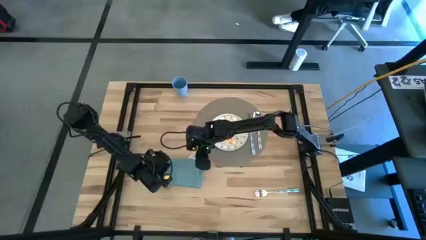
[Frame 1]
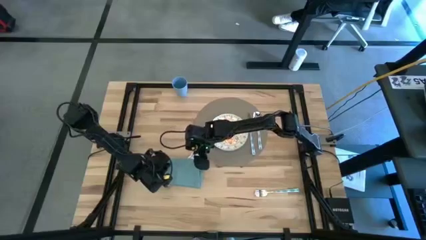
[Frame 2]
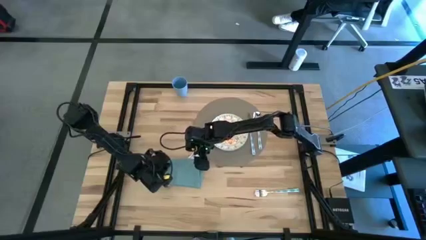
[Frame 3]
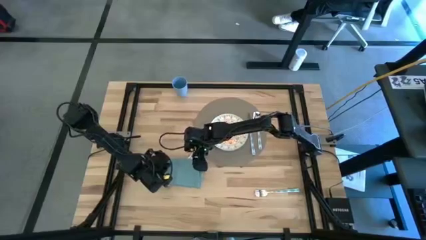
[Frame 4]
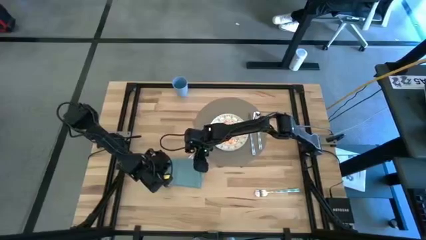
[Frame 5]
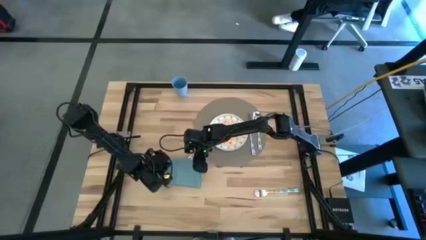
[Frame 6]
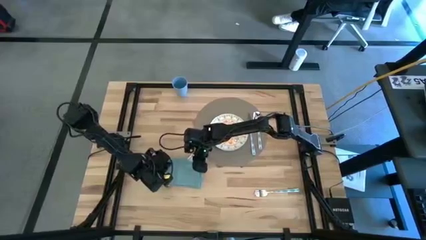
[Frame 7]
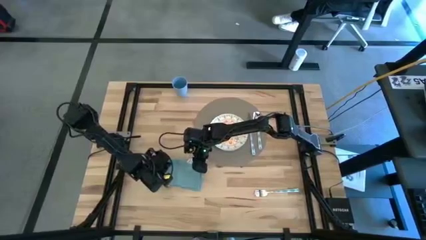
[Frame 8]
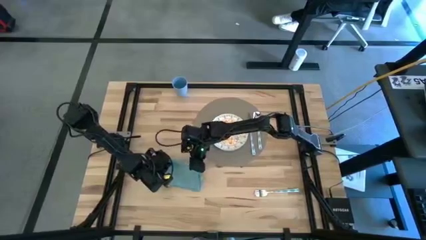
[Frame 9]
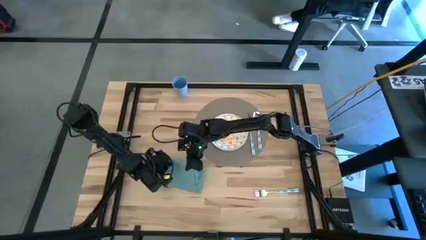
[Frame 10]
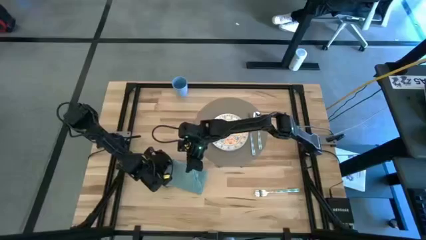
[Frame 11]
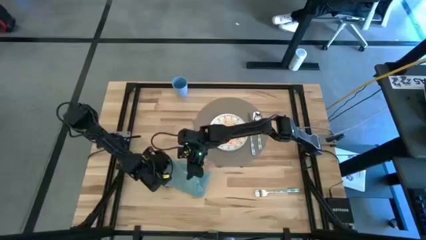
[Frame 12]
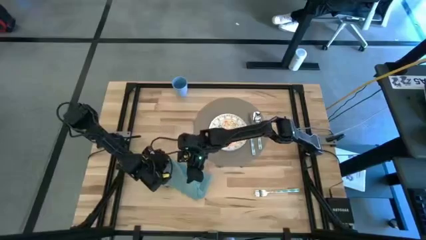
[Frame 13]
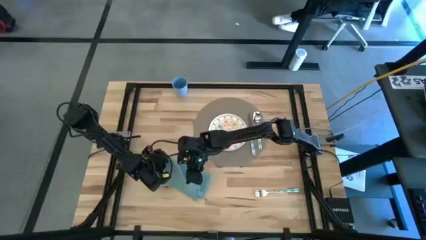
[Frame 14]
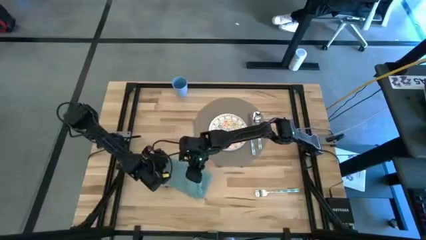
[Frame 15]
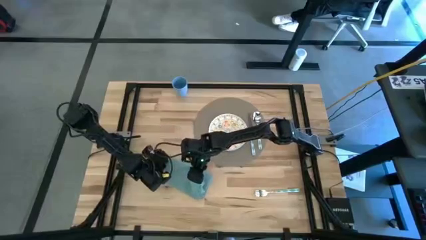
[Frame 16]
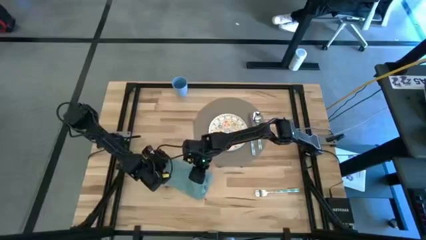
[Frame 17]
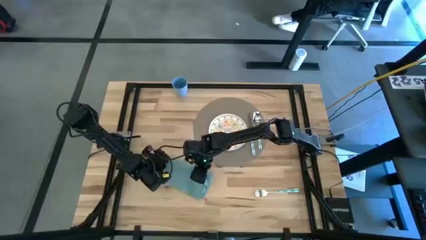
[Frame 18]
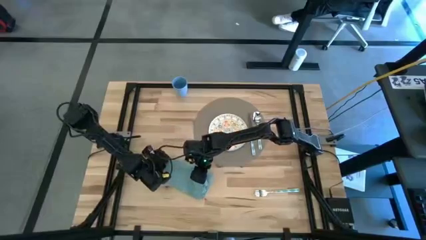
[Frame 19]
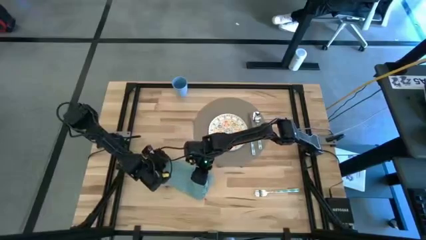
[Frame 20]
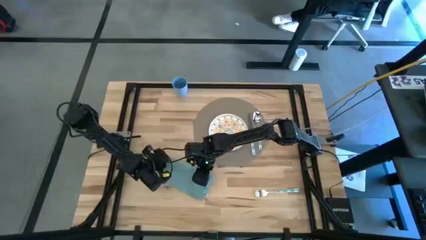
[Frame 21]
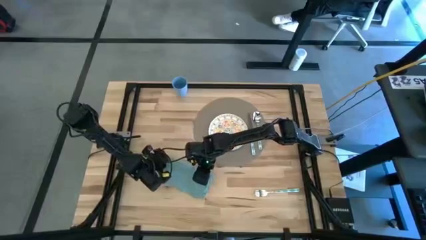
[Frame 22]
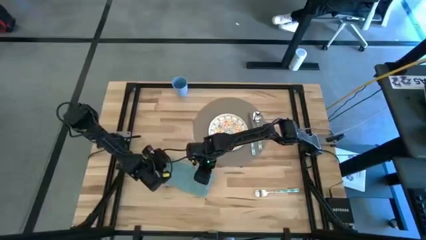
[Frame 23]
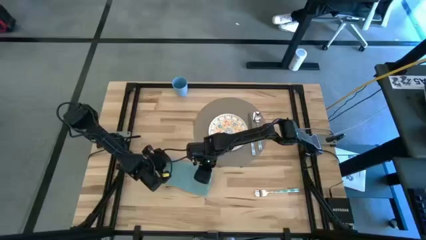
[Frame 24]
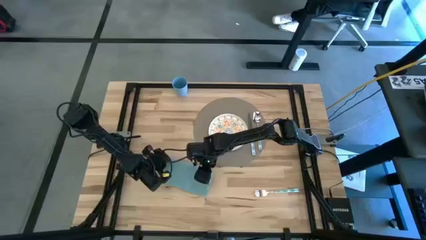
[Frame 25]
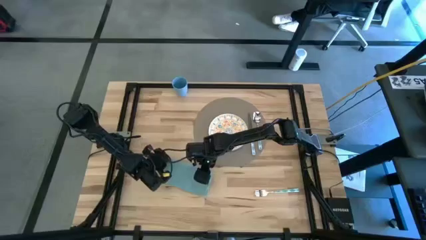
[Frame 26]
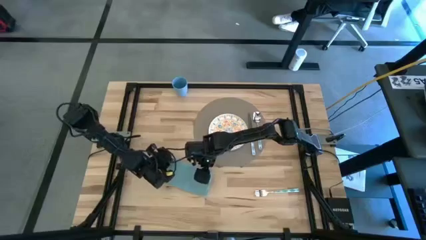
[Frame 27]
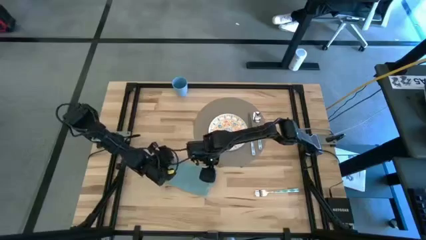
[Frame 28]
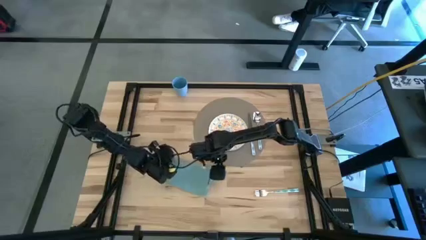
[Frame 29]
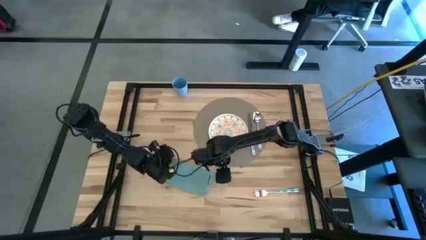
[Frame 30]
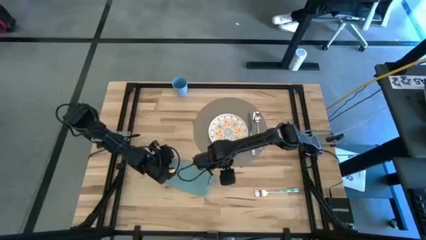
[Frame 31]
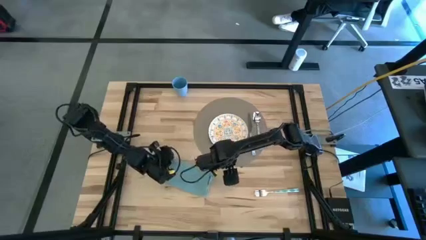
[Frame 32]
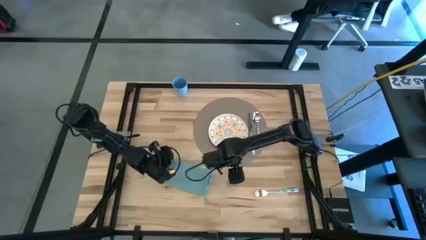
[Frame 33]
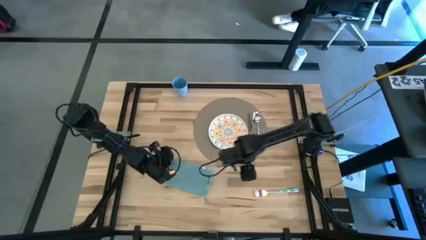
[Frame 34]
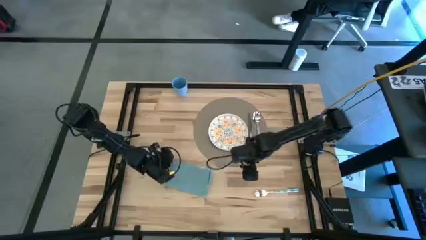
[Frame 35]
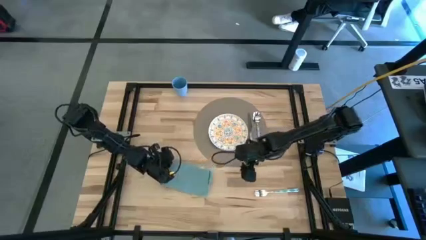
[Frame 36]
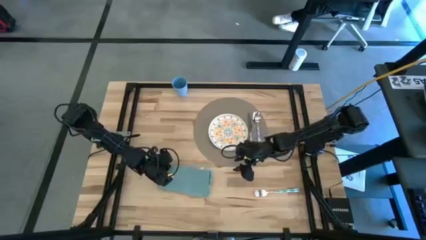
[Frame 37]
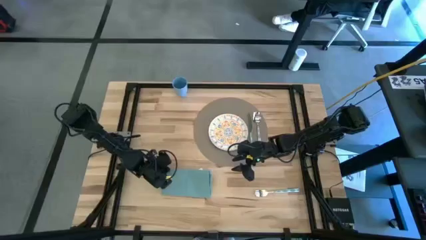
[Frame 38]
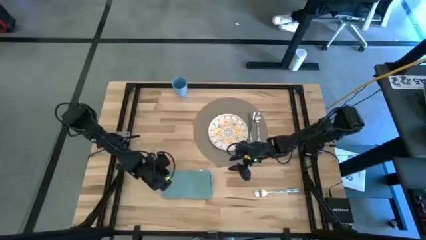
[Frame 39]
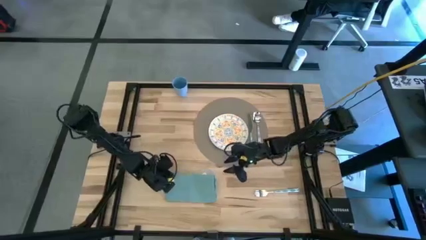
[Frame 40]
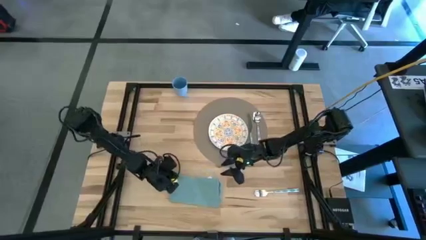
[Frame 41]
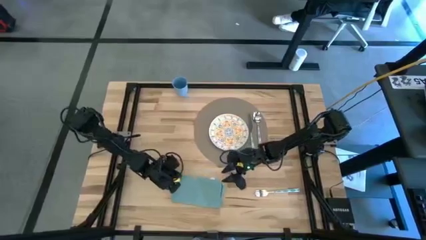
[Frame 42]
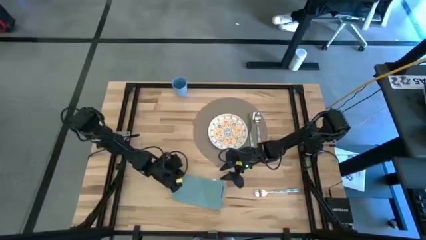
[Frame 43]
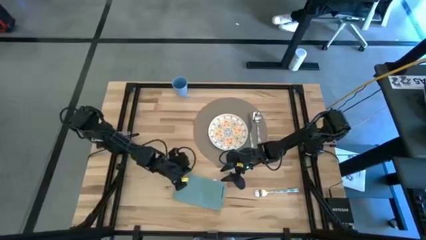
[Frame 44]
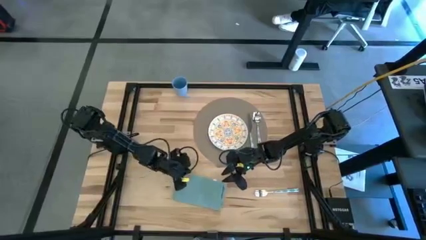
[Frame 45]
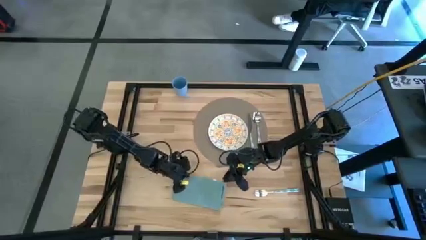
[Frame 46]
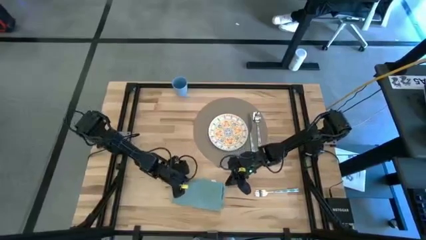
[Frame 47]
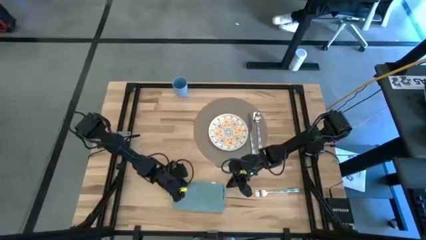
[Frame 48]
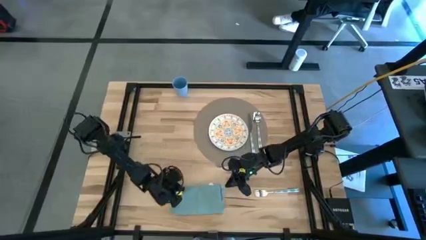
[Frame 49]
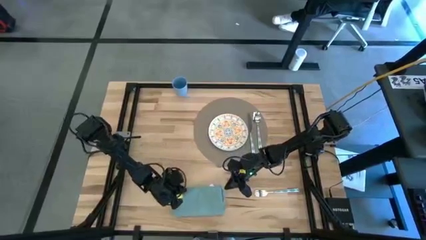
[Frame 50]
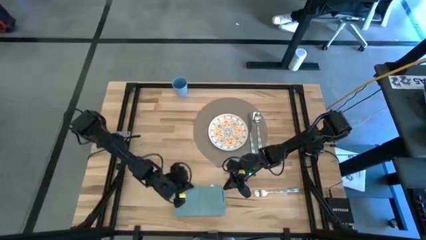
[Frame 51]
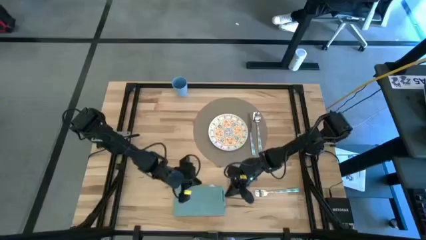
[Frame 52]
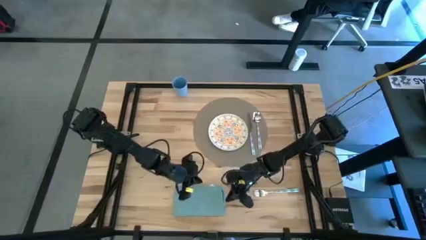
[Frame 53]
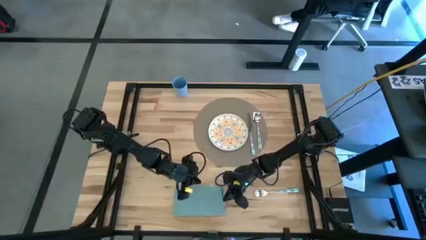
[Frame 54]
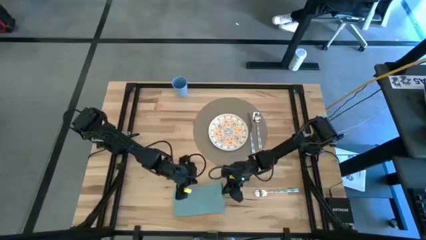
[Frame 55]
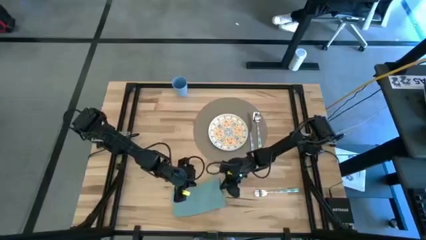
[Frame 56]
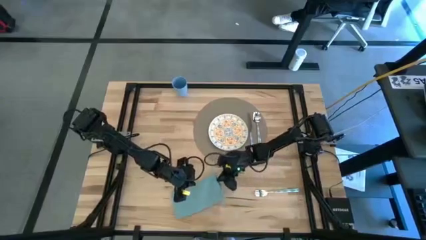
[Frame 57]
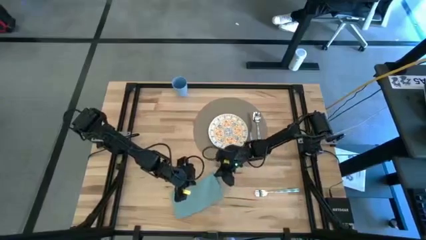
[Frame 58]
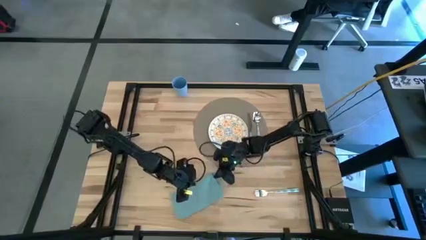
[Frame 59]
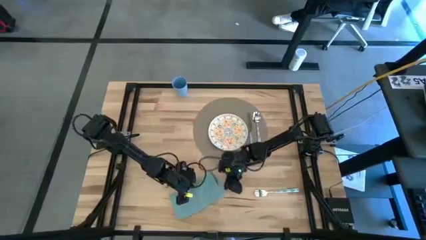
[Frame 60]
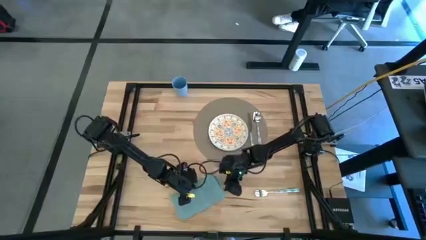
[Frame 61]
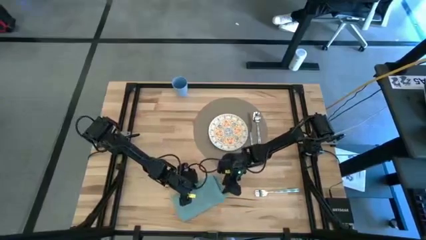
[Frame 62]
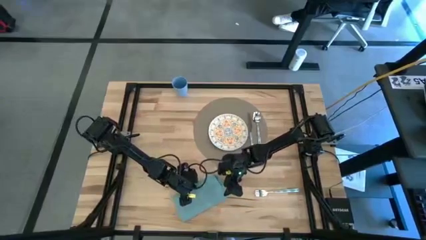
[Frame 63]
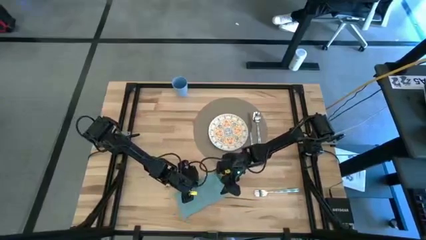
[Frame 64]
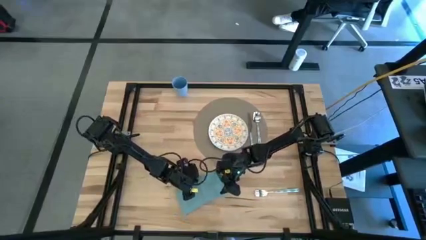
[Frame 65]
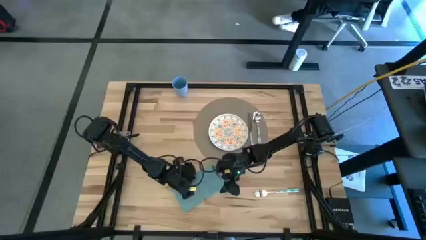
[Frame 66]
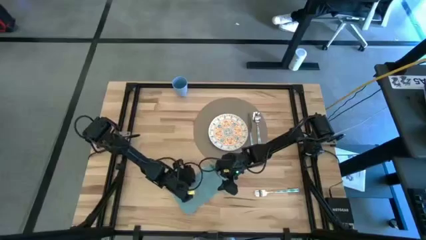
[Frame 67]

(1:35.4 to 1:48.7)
Task: Set table place
Move the blue napkin to the top left of the table
